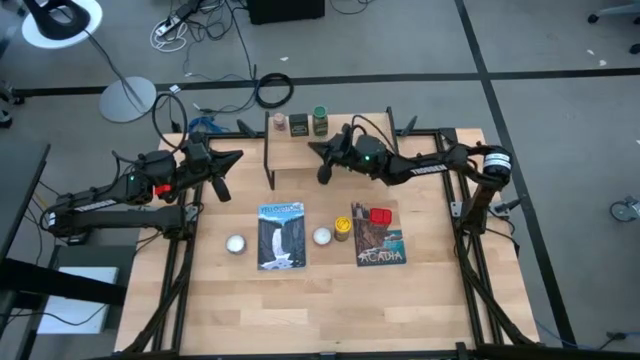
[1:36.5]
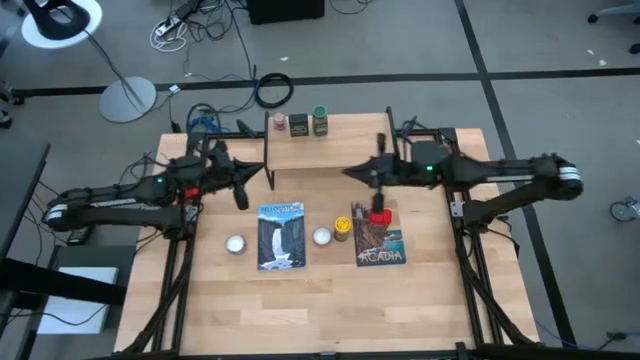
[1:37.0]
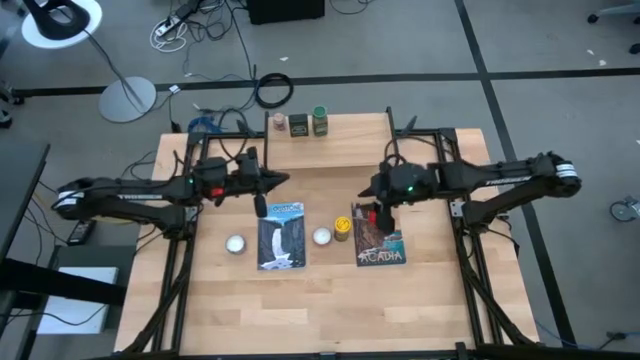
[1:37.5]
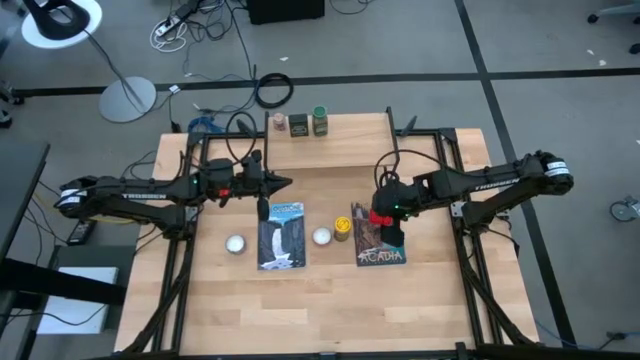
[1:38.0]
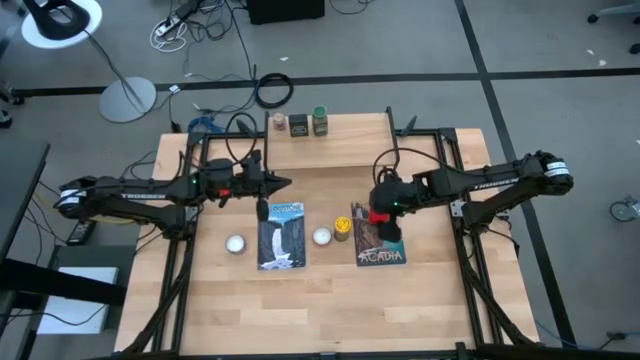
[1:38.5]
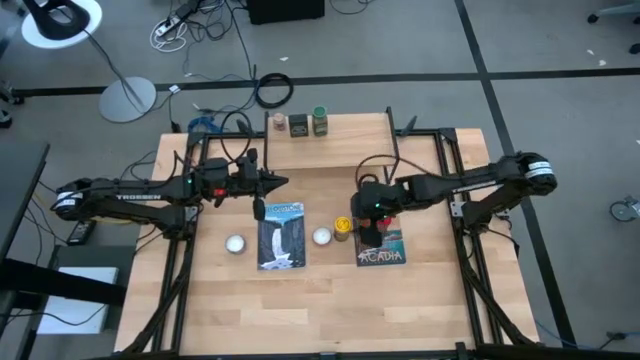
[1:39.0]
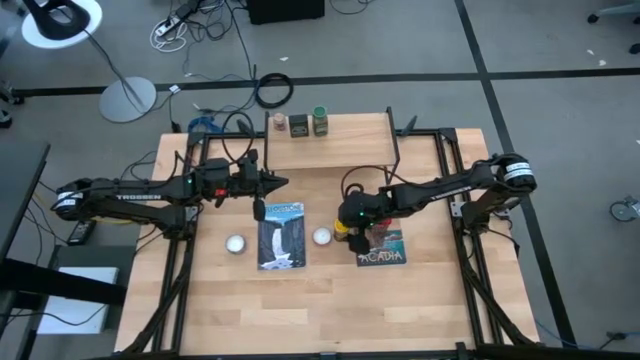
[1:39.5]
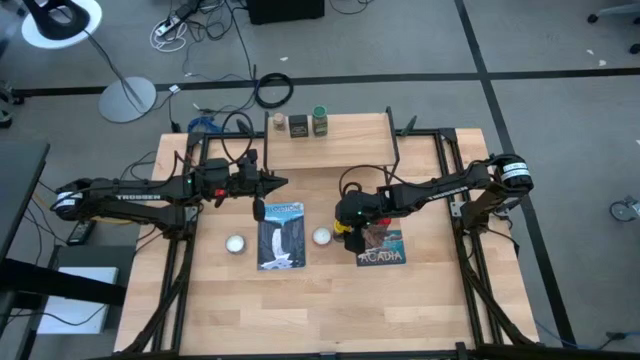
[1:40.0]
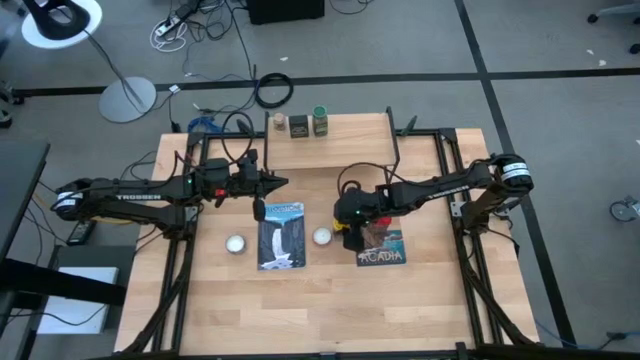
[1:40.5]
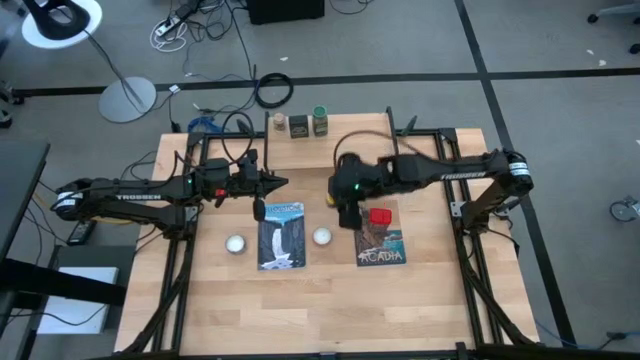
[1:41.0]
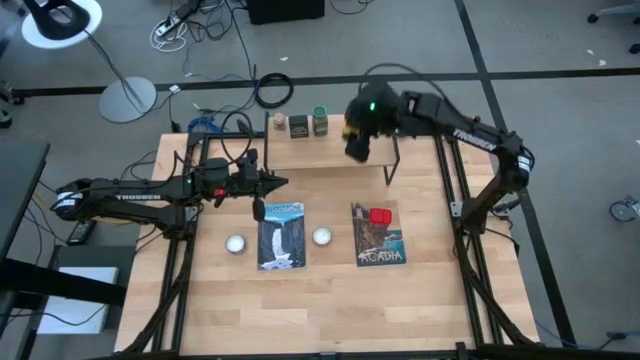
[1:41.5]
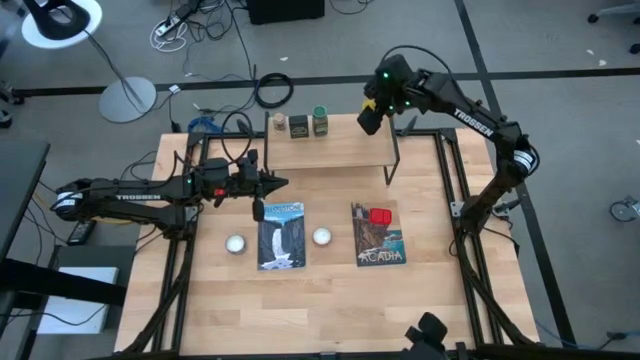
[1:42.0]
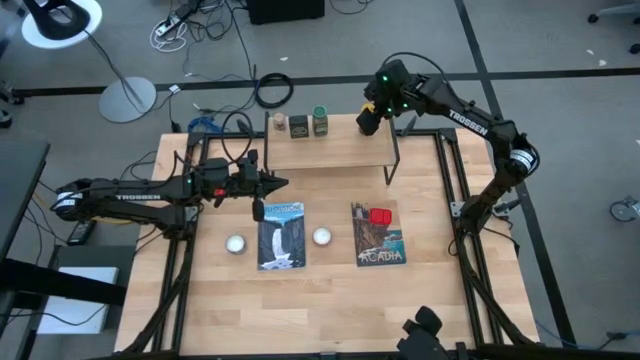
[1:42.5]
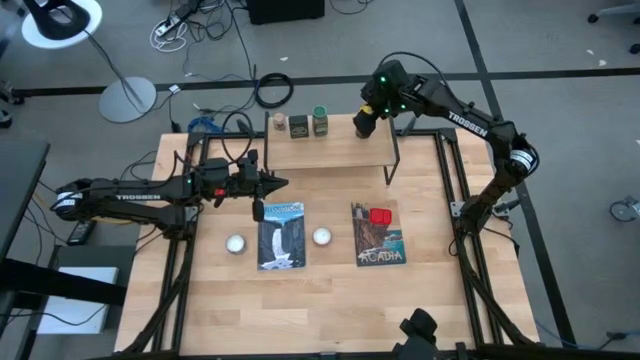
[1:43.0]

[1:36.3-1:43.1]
Task: Shelf spices
Put the yellow spice on the shelf

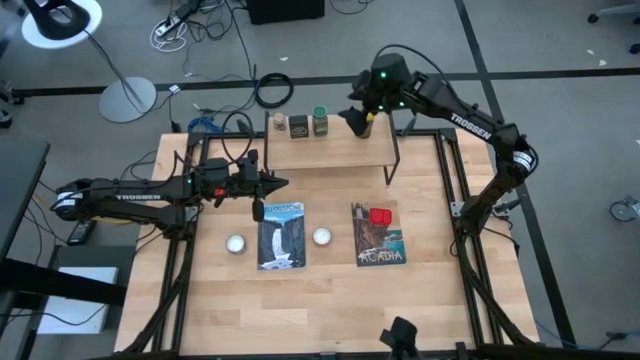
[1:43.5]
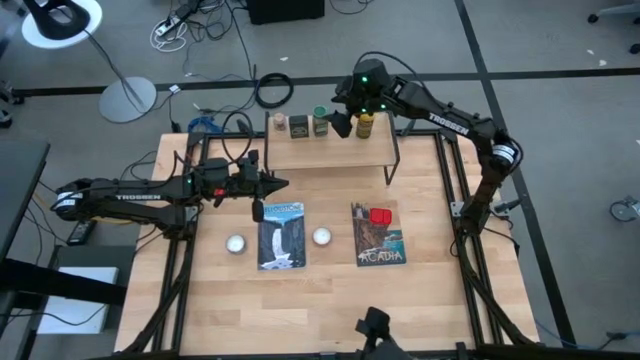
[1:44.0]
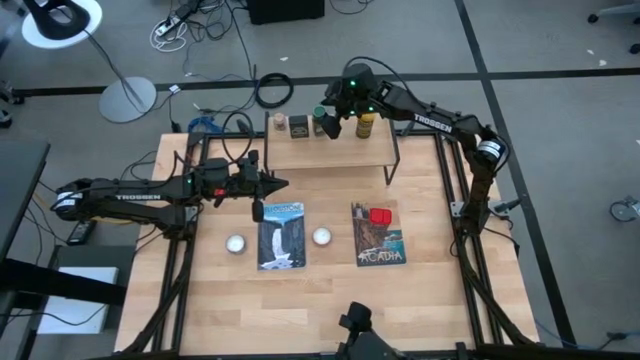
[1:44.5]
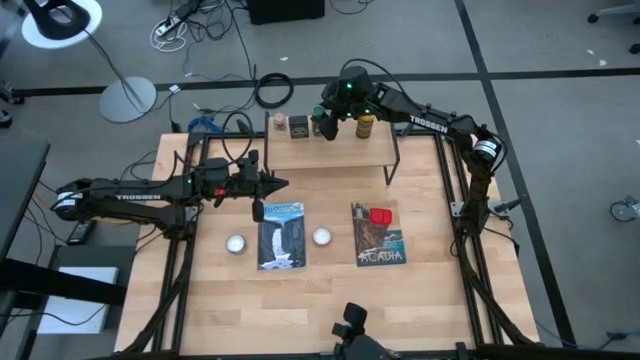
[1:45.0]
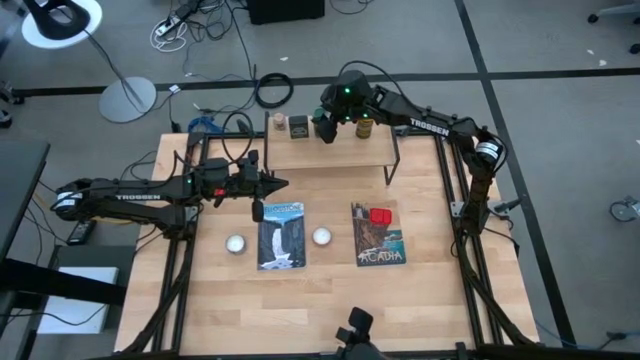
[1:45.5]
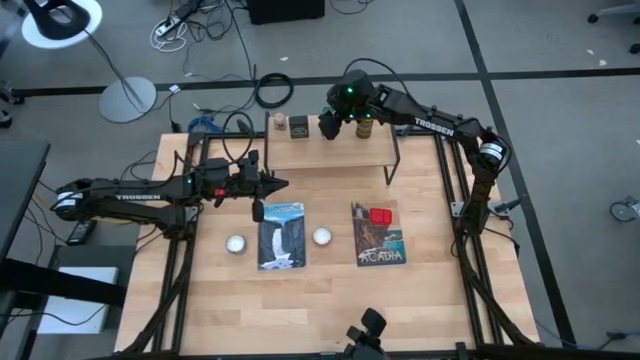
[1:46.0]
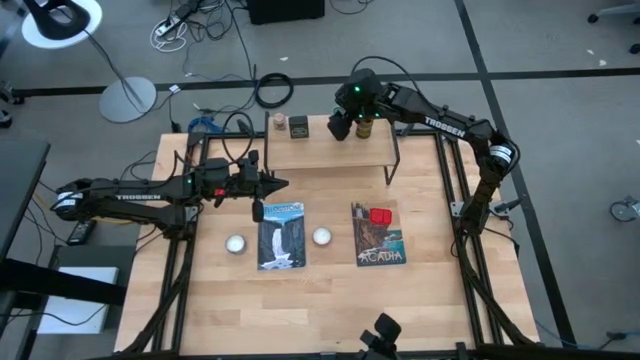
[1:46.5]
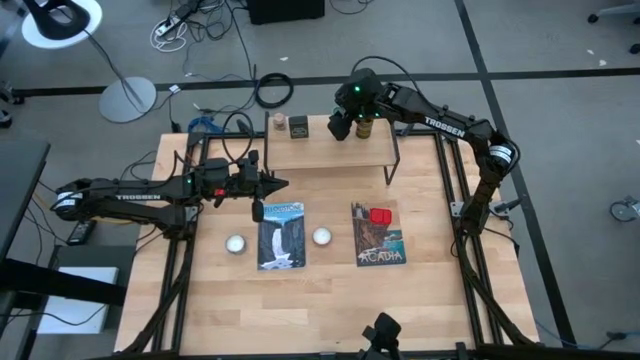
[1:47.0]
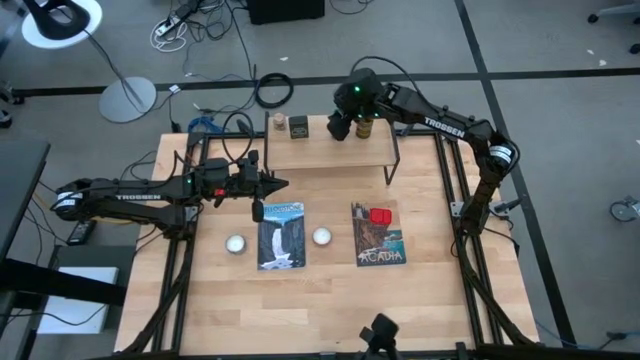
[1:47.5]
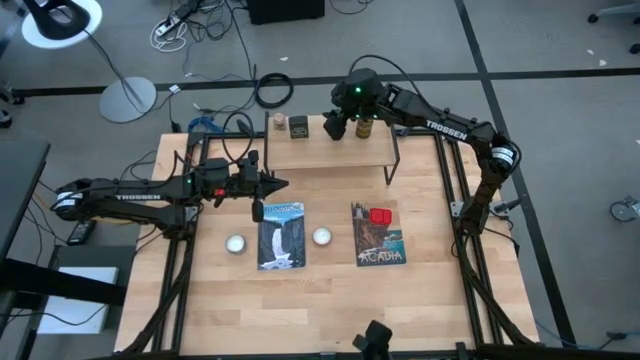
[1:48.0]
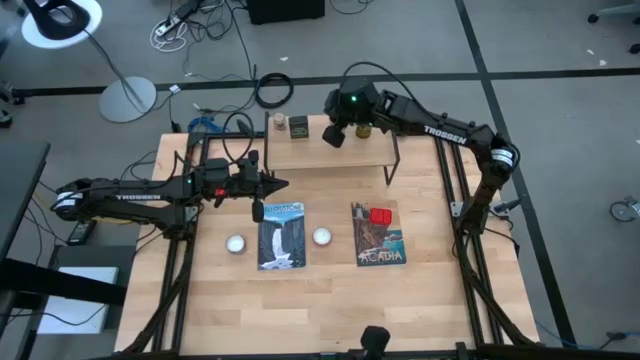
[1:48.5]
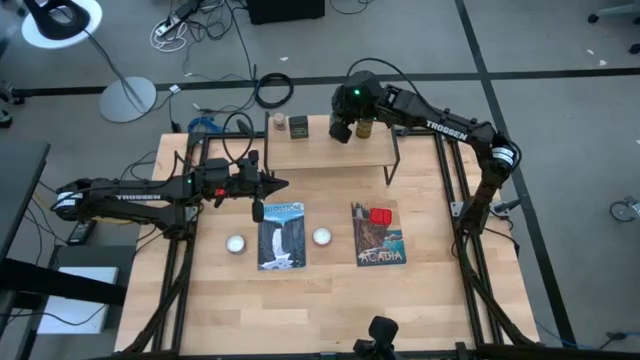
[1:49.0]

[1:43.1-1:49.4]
Adjust the green spice

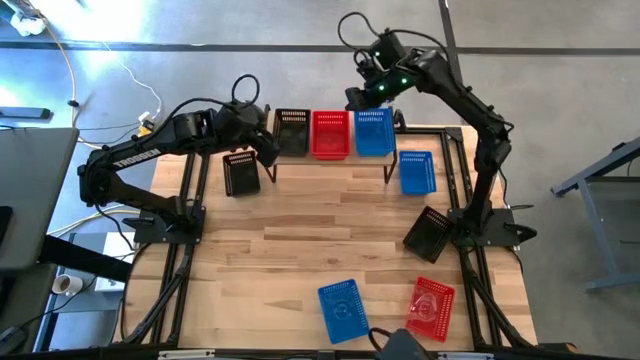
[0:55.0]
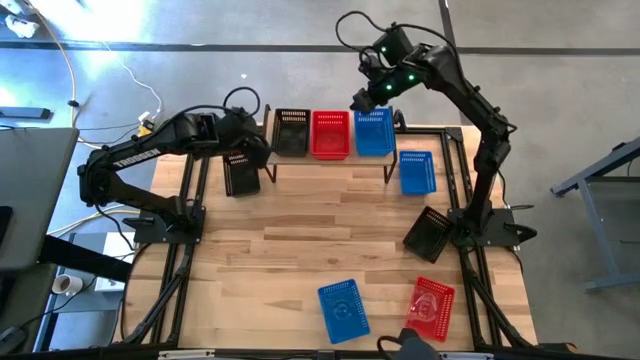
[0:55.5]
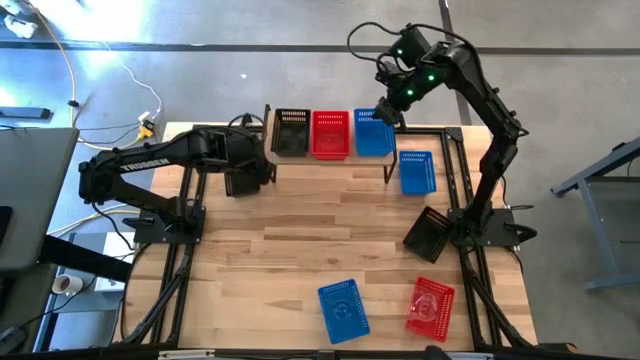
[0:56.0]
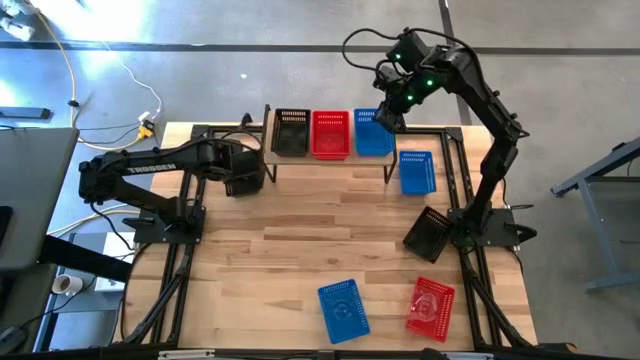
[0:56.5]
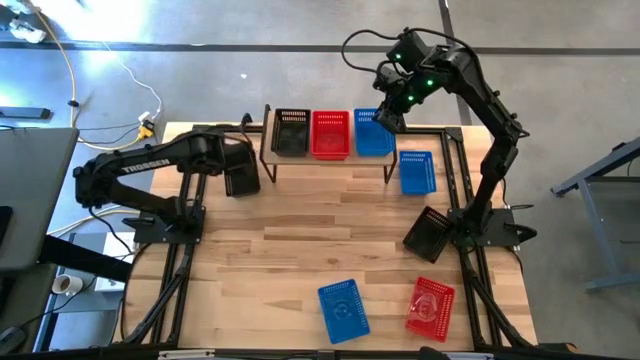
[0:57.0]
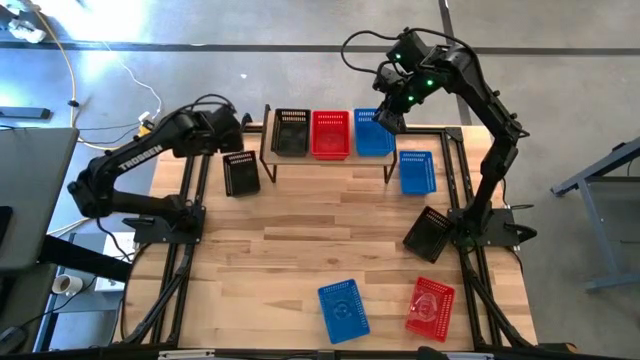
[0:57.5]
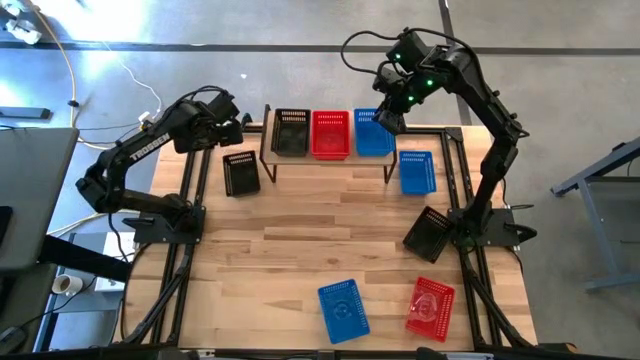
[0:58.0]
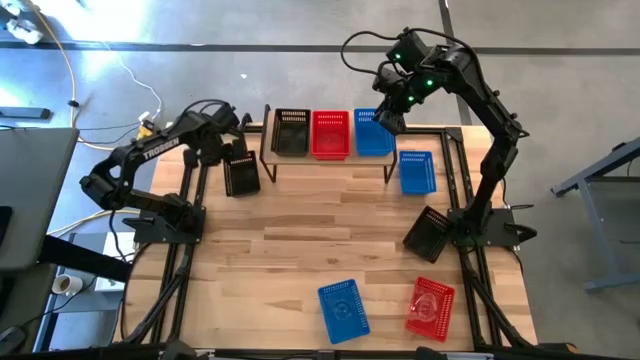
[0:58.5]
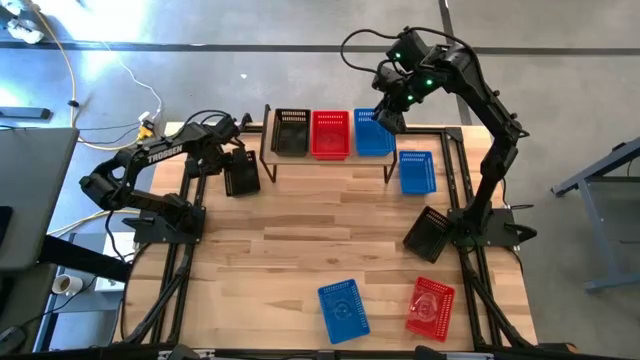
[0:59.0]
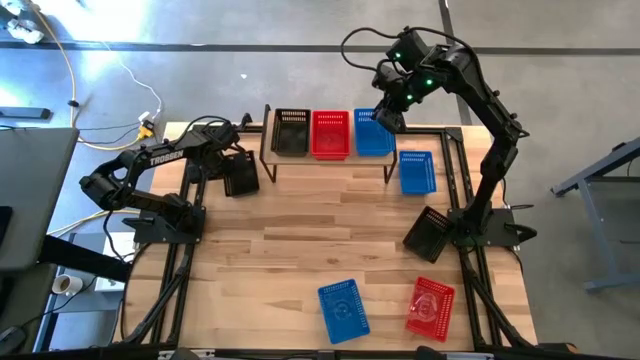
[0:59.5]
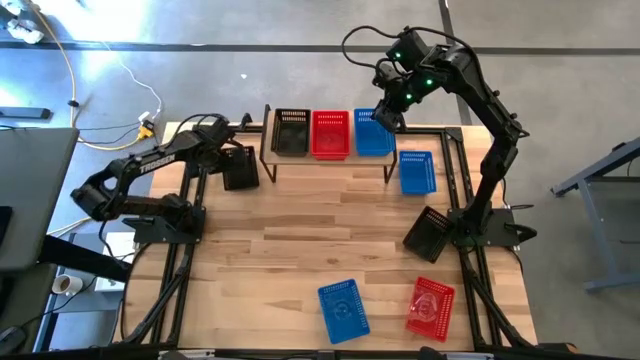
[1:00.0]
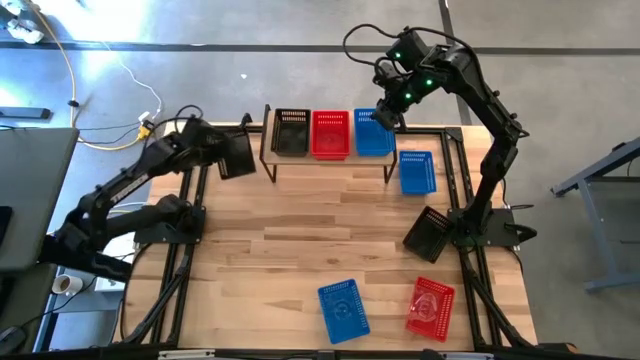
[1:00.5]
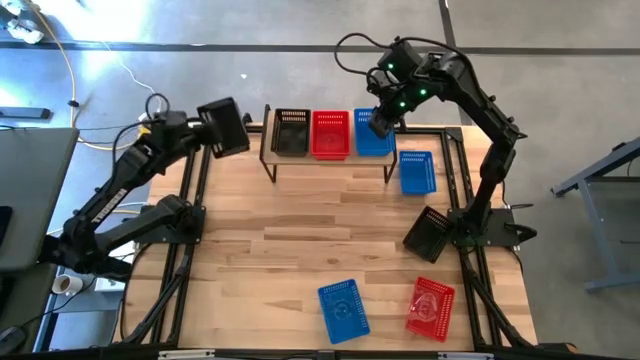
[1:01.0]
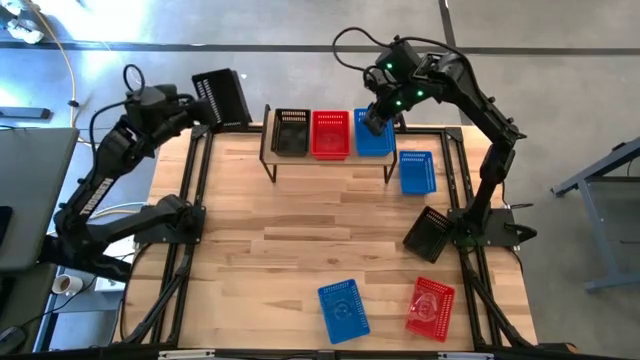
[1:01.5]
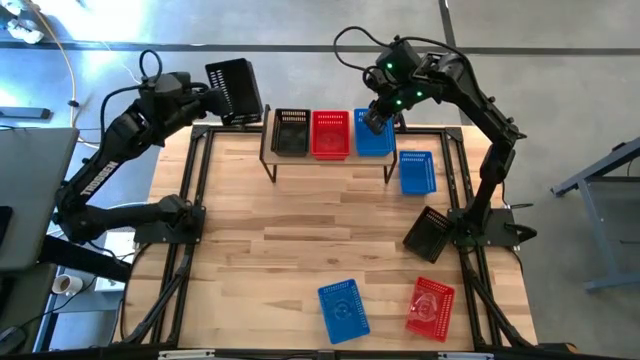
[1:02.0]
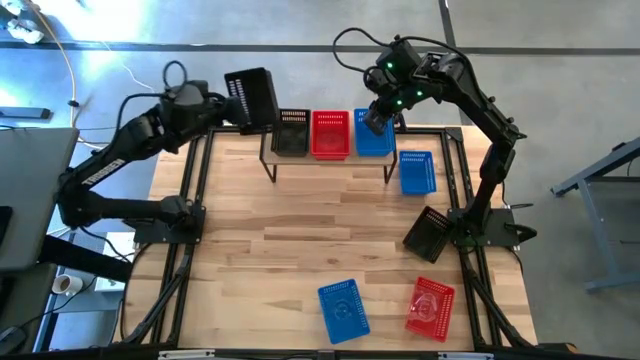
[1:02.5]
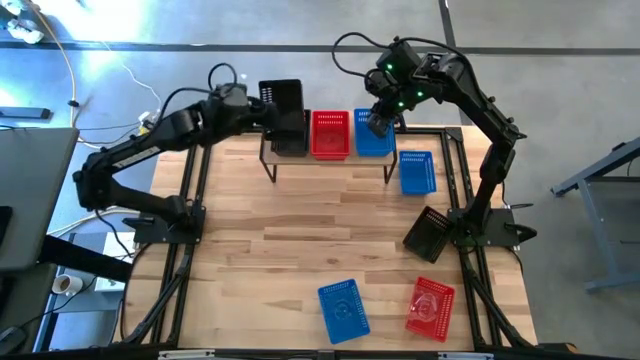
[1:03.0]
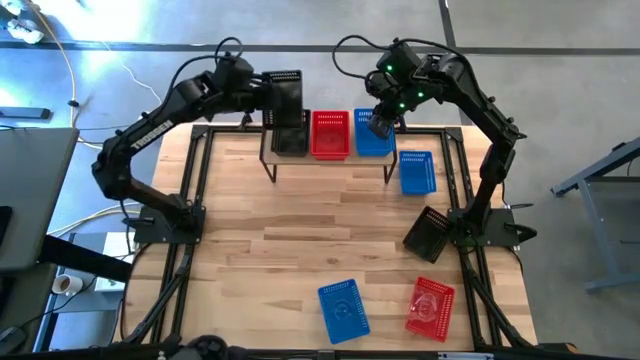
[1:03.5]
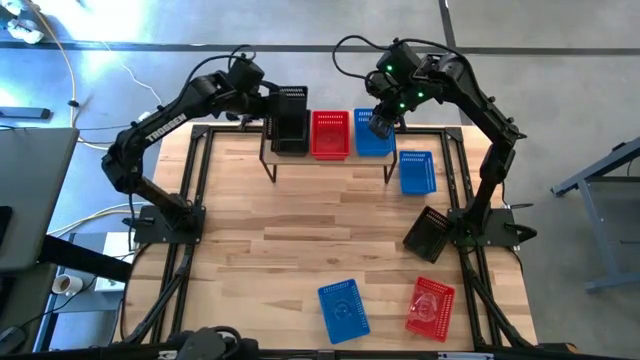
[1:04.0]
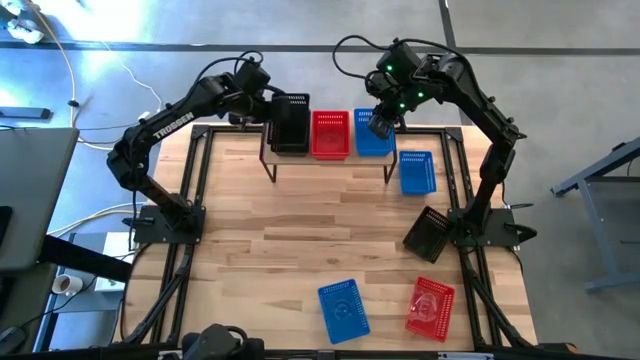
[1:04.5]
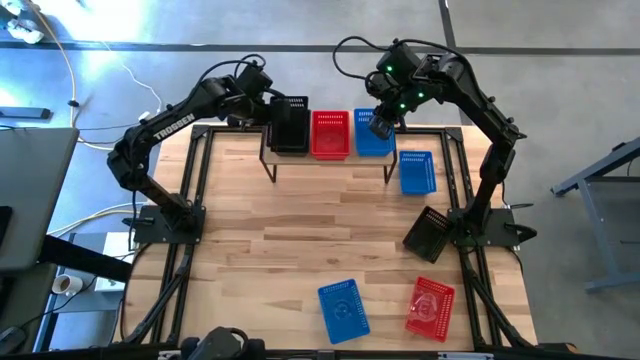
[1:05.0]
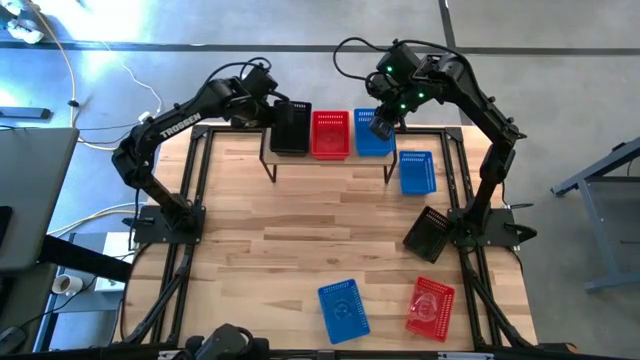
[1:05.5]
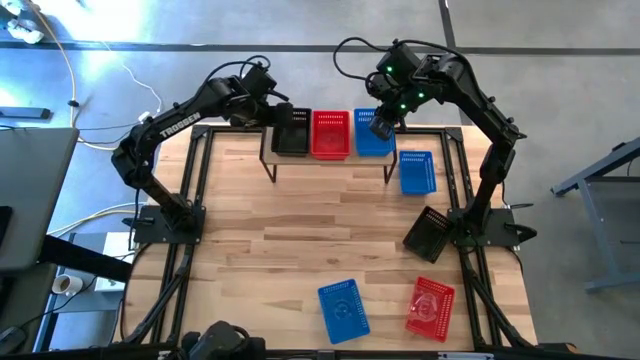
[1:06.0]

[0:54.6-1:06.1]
Task: Stack baskets on shelf by color
Stack the left black bin on top of the black bin on the shelf
